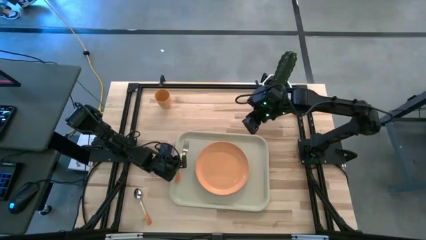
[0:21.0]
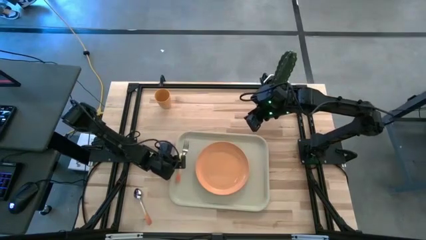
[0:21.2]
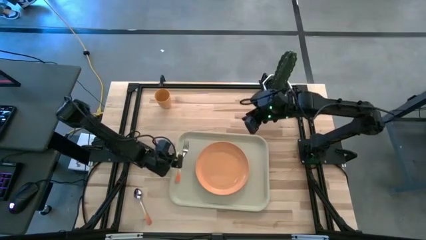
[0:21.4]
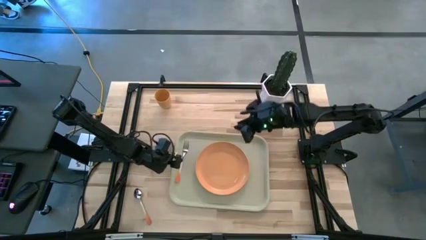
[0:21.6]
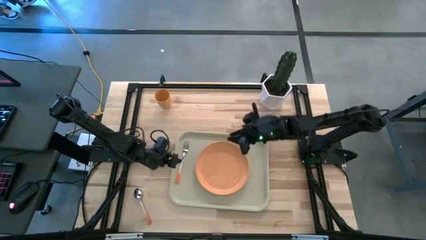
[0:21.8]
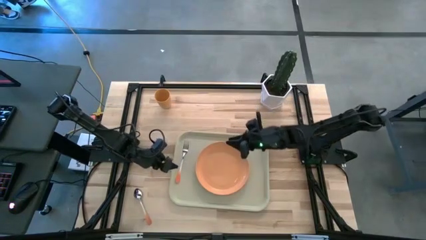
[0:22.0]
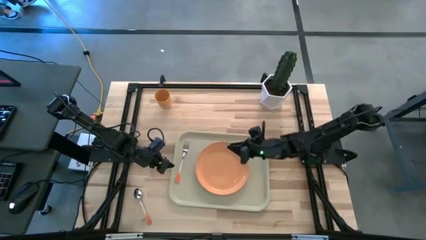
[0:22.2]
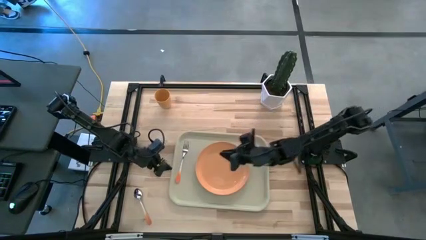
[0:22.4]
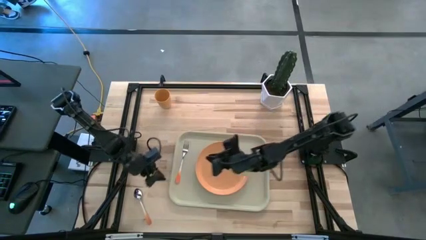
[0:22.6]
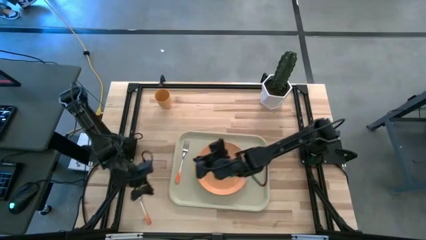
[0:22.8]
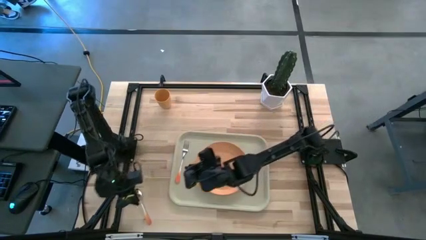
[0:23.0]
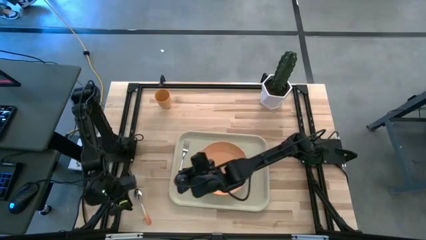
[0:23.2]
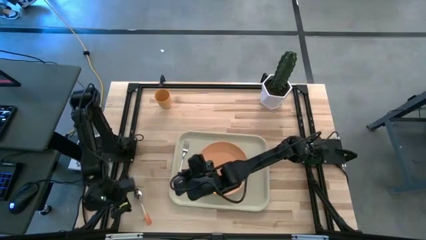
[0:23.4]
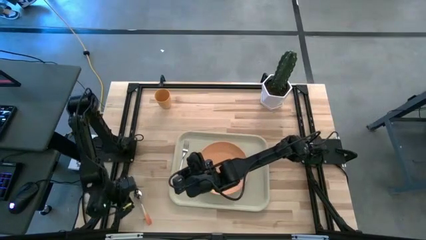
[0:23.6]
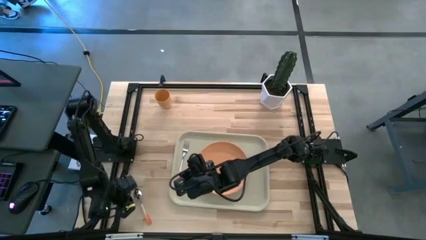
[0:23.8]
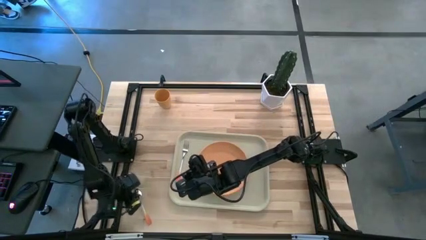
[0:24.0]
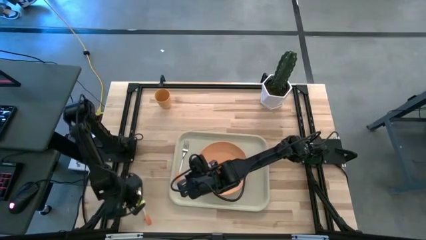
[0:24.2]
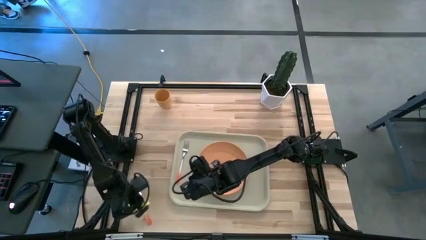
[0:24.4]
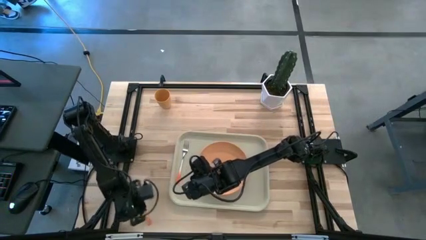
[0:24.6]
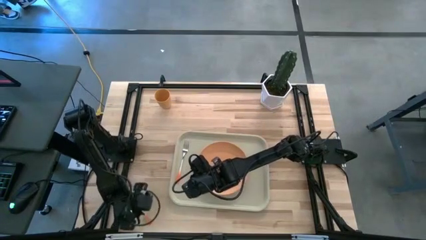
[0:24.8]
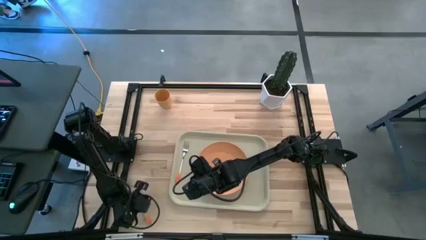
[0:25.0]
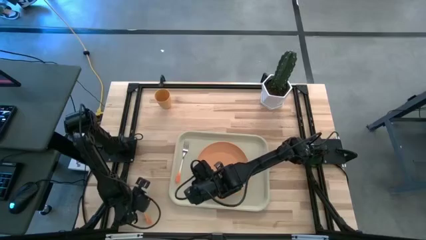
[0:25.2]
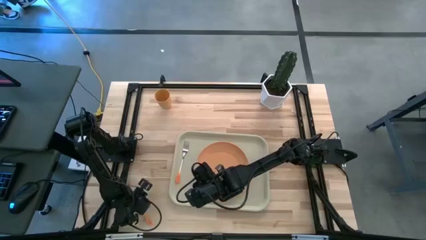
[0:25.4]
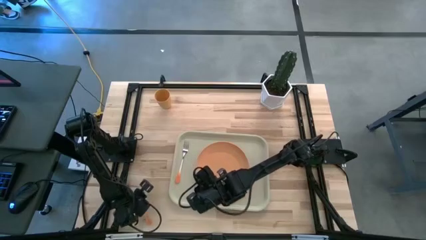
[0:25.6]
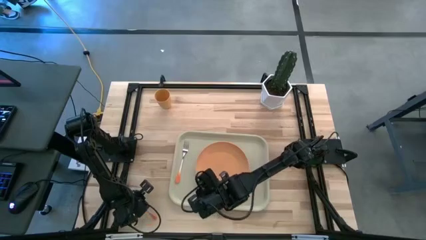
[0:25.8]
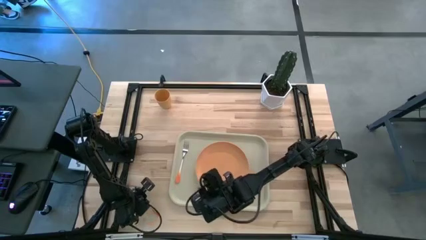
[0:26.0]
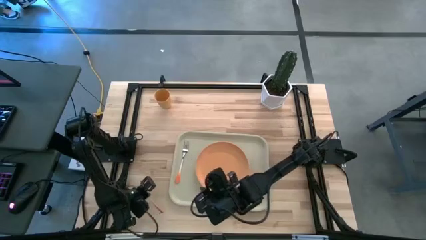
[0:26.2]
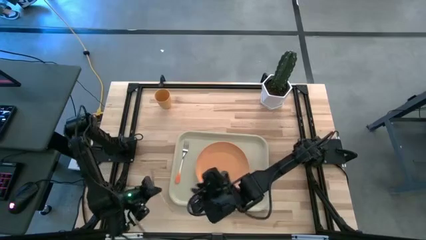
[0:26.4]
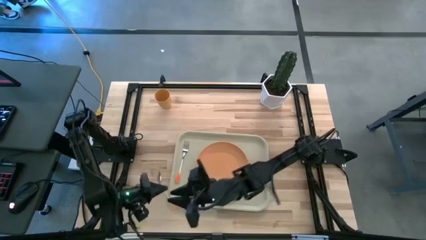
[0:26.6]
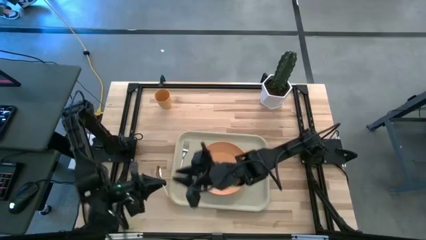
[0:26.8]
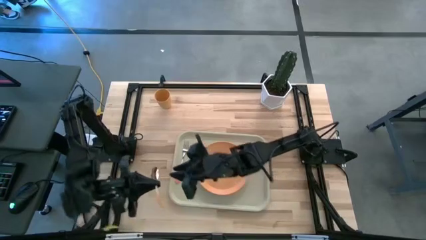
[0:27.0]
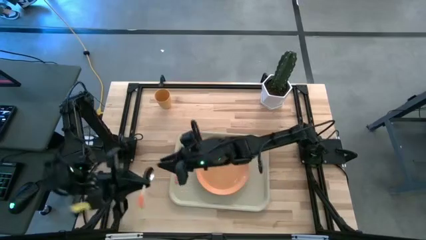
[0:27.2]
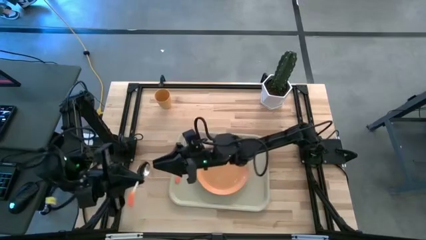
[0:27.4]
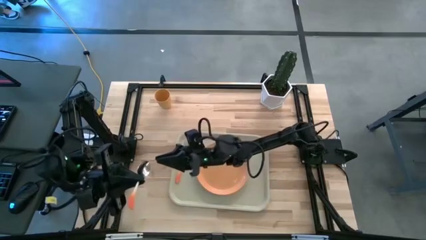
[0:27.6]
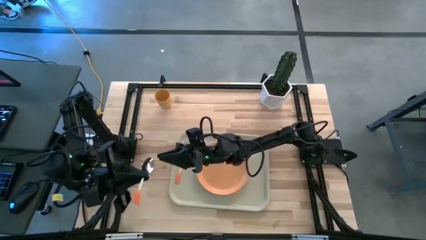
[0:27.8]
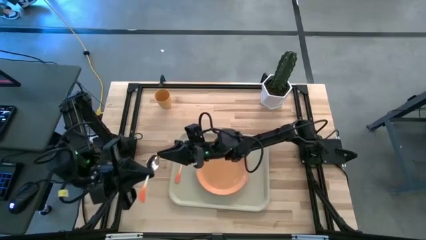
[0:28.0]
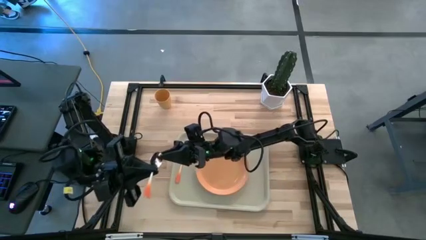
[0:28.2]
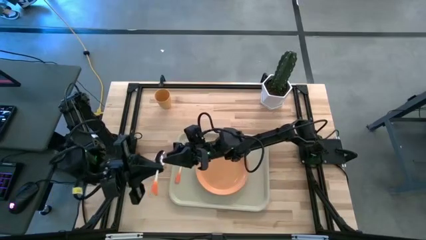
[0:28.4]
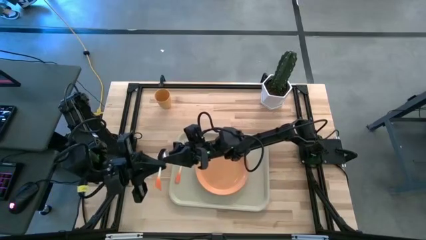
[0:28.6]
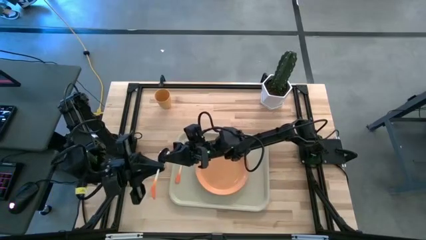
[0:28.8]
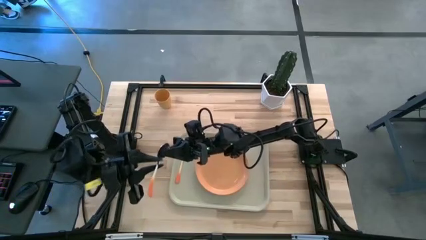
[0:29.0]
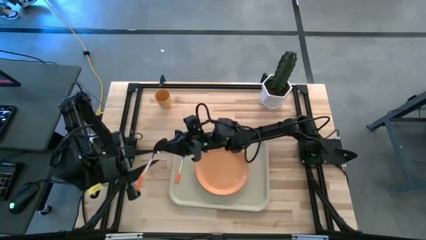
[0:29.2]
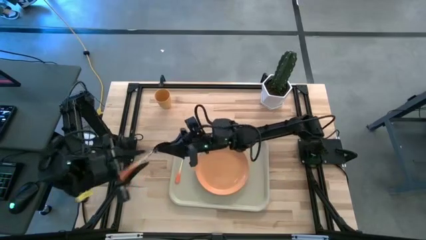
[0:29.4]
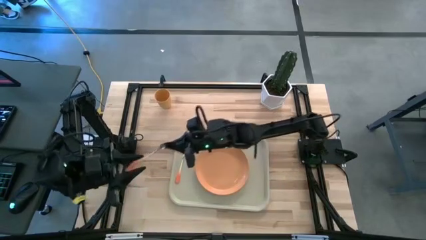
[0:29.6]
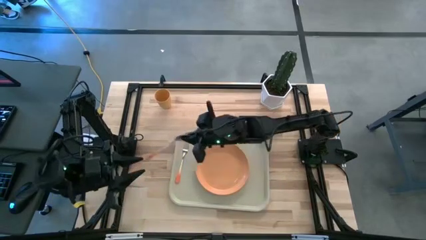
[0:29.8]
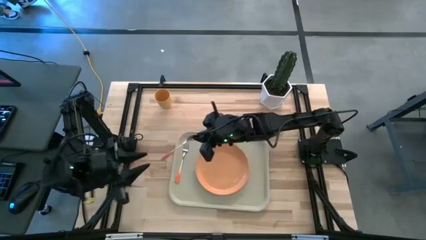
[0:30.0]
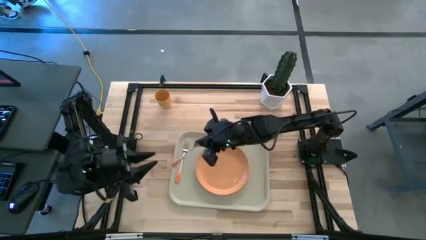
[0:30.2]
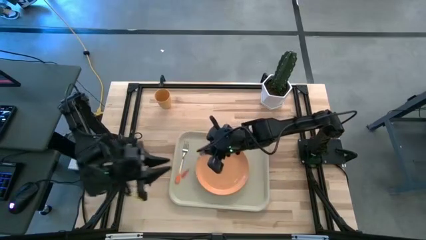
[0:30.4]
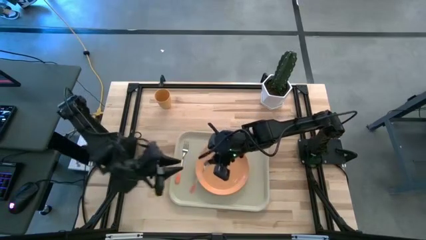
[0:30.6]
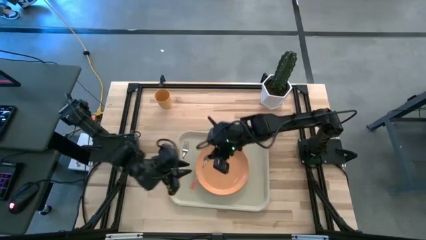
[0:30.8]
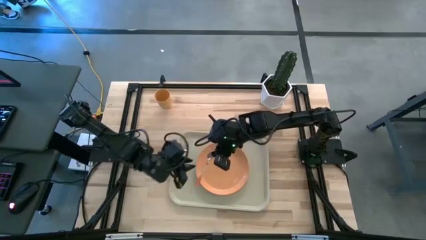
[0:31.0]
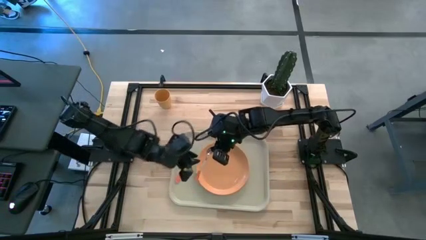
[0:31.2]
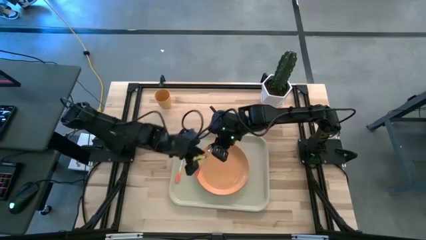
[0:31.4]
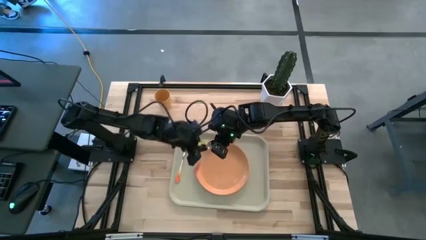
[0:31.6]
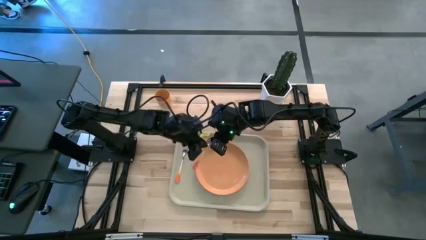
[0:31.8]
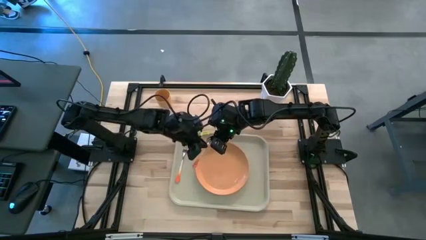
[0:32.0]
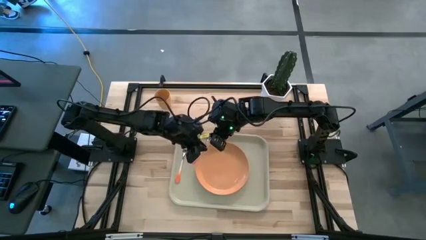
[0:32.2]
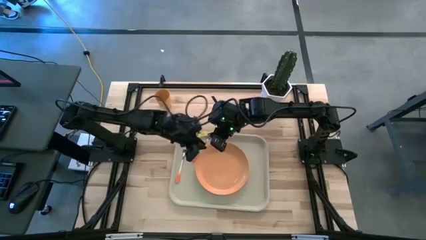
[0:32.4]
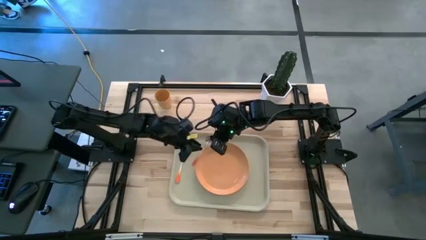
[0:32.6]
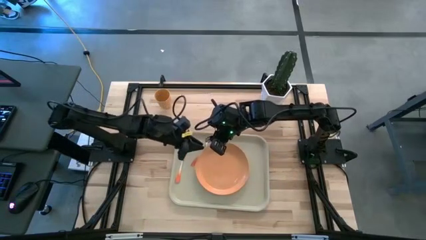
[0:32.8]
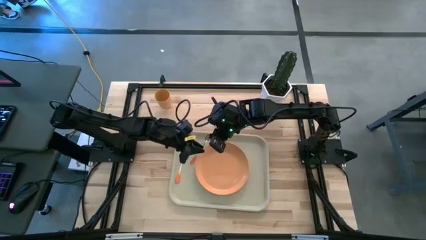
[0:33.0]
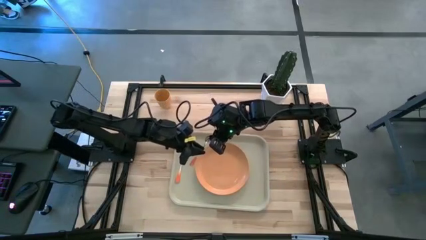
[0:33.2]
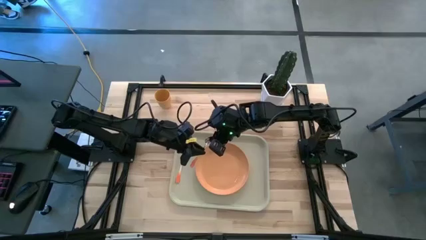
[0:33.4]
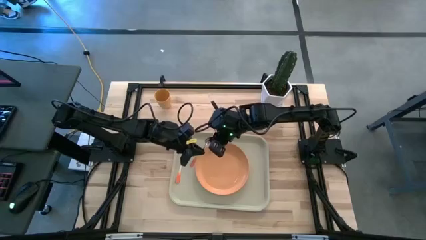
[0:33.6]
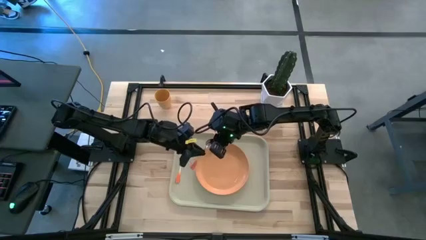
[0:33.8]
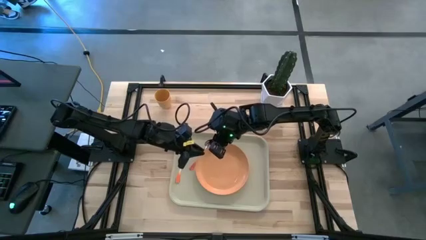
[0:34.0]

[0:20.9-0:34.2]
Task: Pick and place plate/cup/fork/spoon on tray
Put the orange spoon on the light brown serving tray to the left side of orange plate
